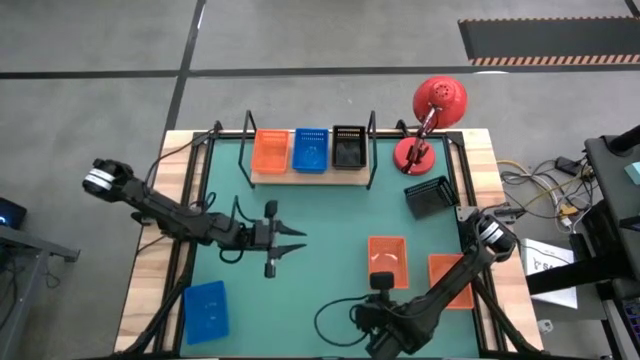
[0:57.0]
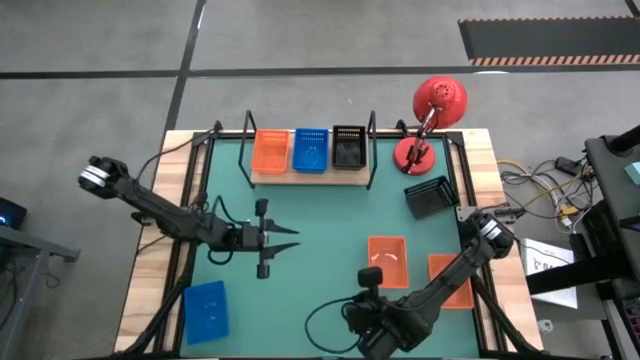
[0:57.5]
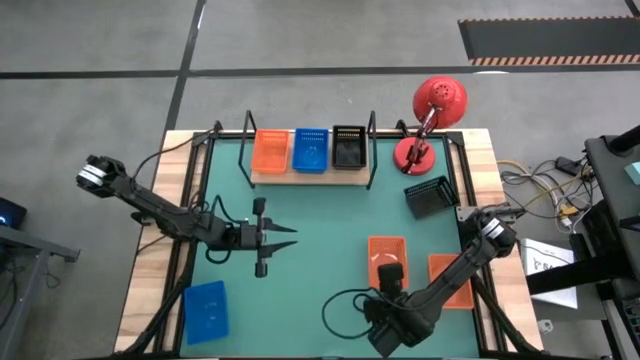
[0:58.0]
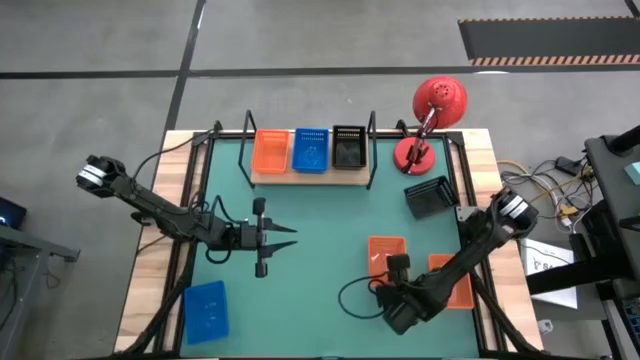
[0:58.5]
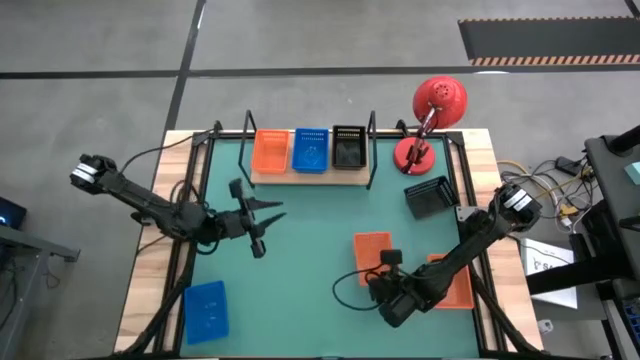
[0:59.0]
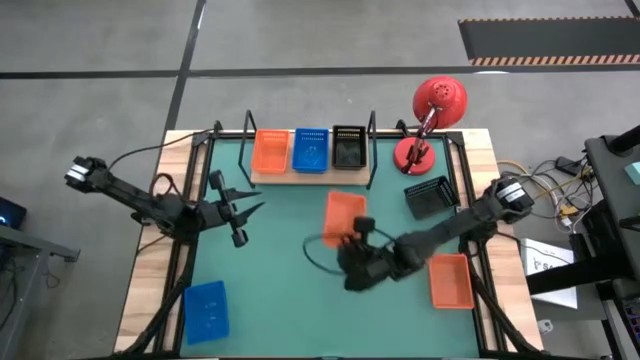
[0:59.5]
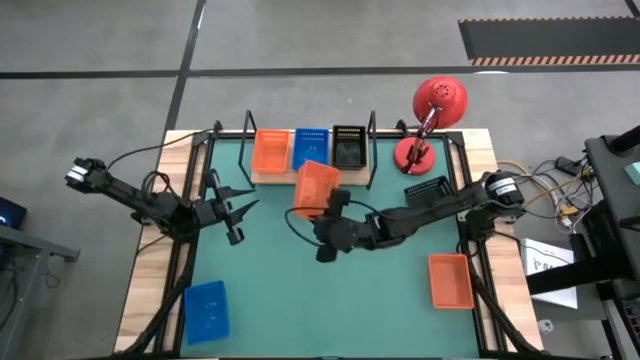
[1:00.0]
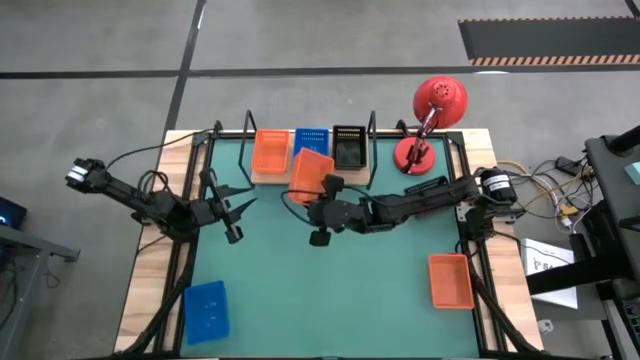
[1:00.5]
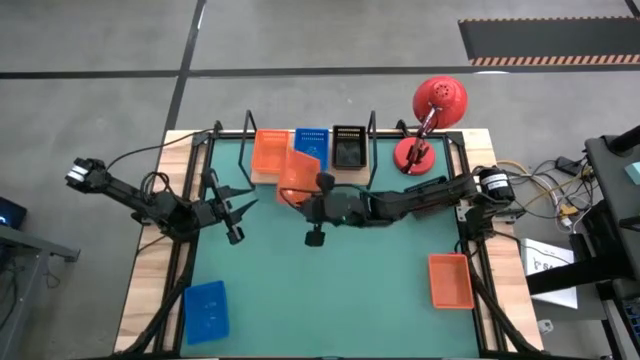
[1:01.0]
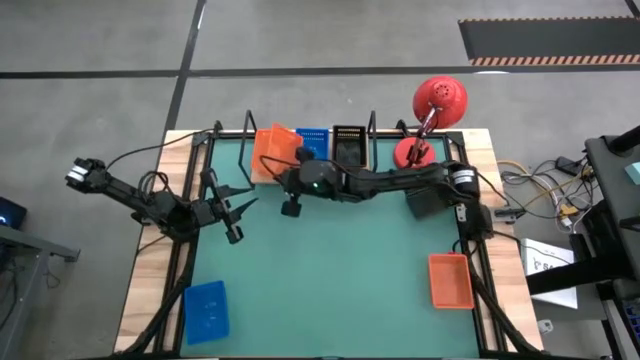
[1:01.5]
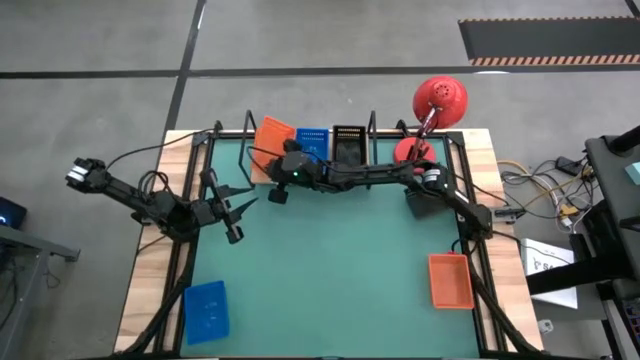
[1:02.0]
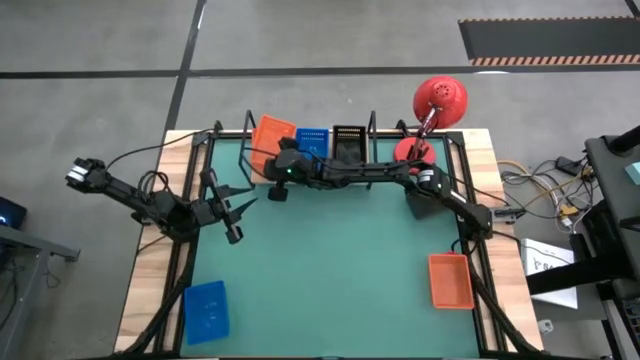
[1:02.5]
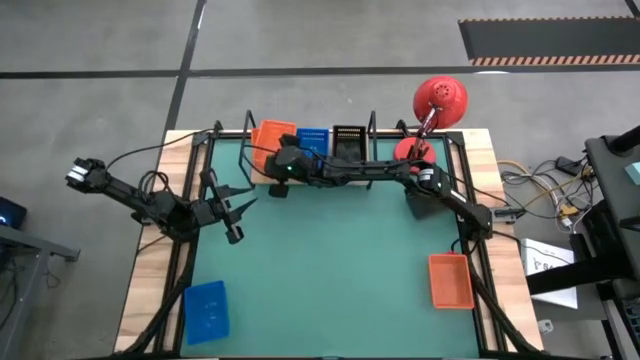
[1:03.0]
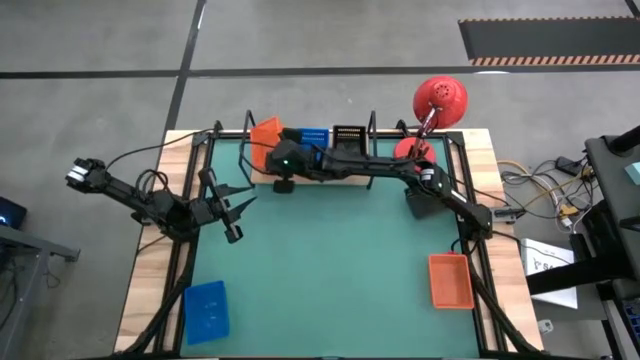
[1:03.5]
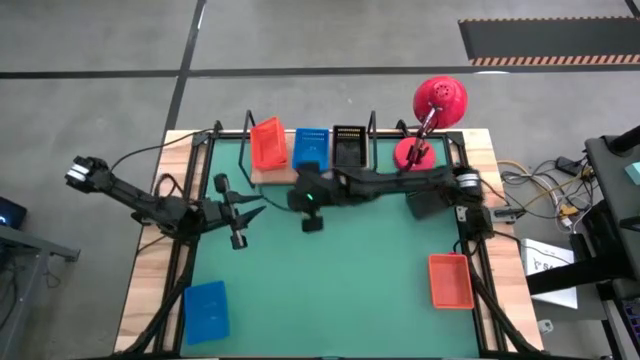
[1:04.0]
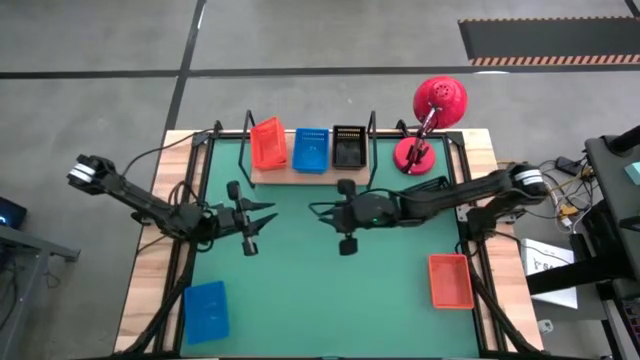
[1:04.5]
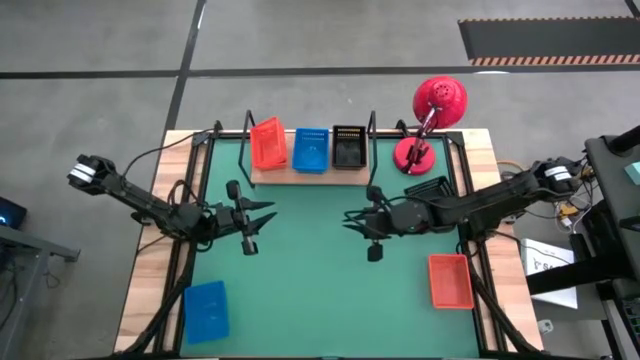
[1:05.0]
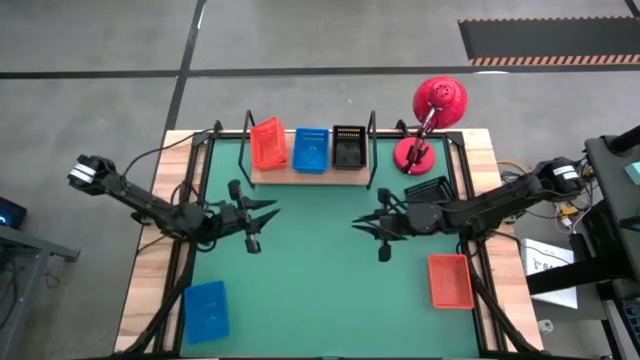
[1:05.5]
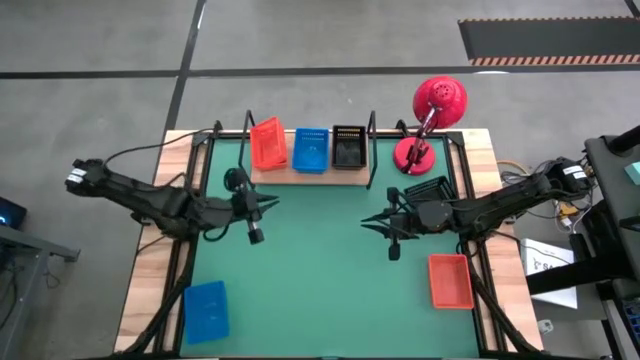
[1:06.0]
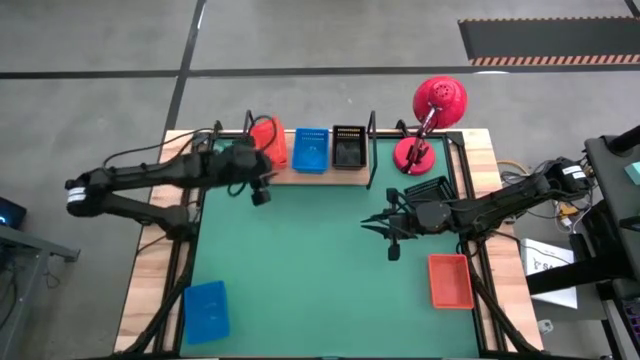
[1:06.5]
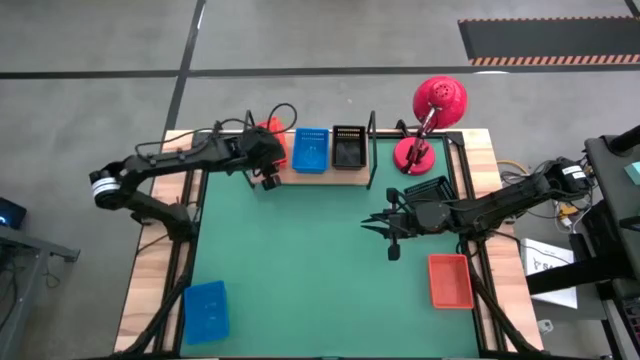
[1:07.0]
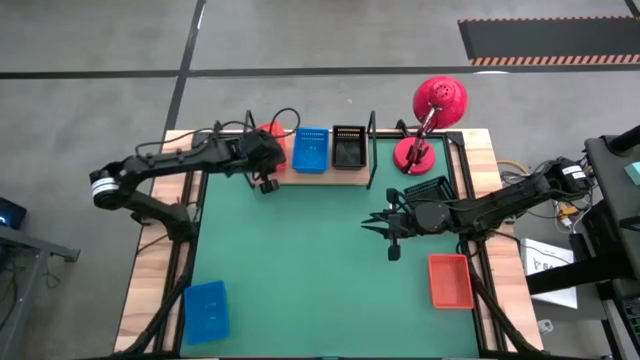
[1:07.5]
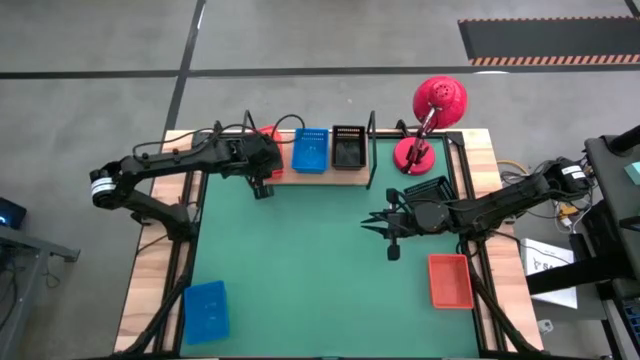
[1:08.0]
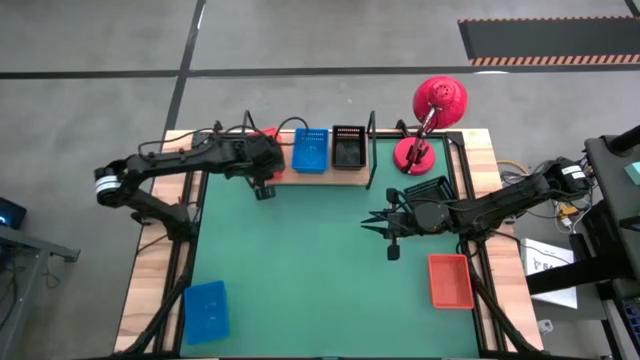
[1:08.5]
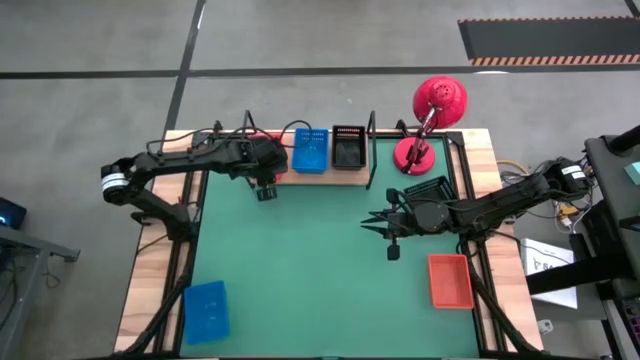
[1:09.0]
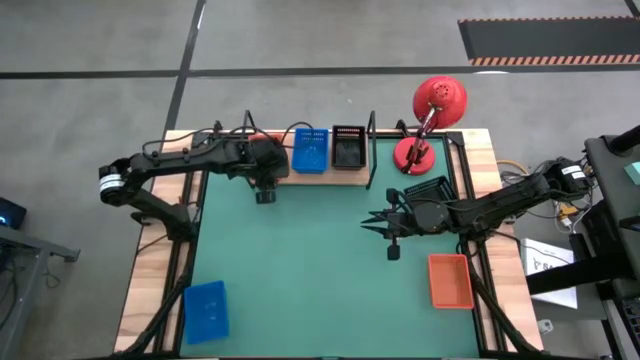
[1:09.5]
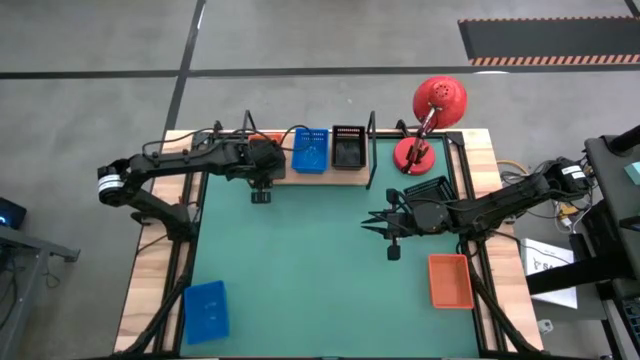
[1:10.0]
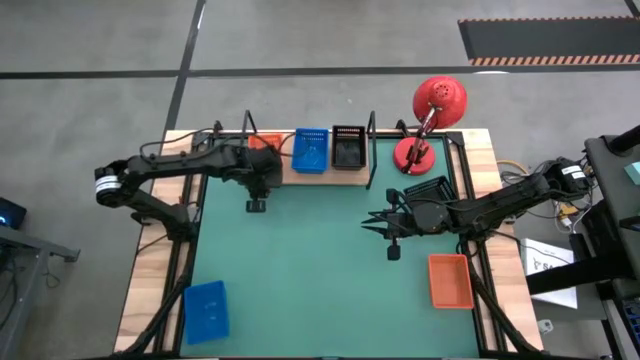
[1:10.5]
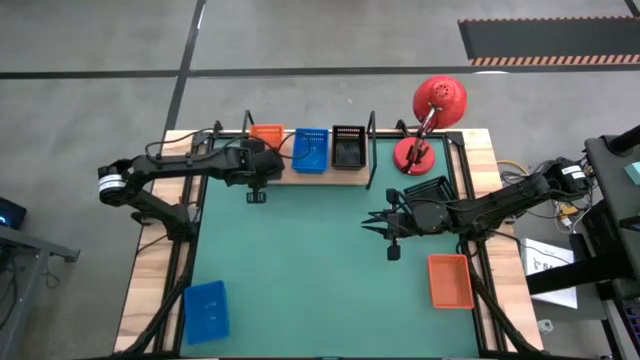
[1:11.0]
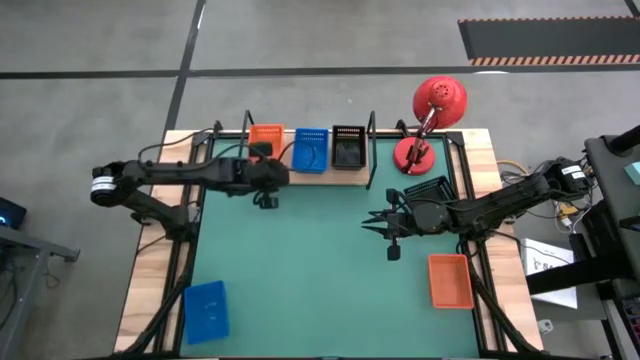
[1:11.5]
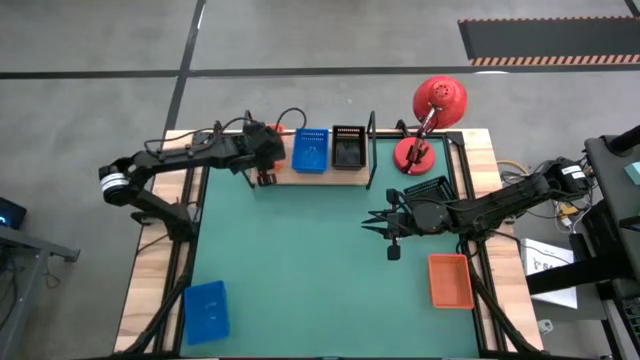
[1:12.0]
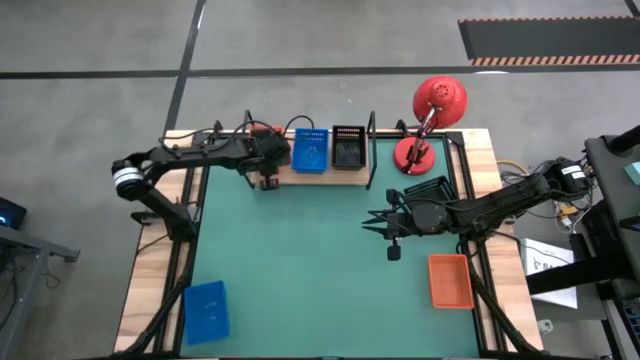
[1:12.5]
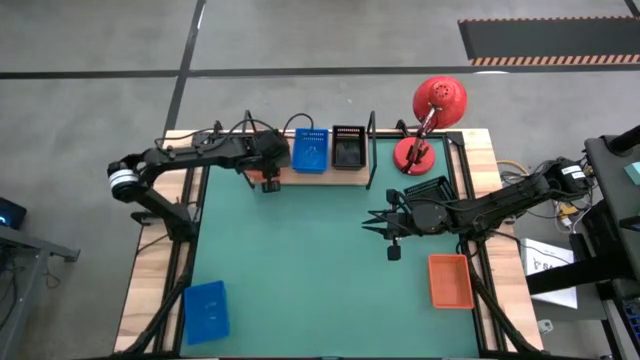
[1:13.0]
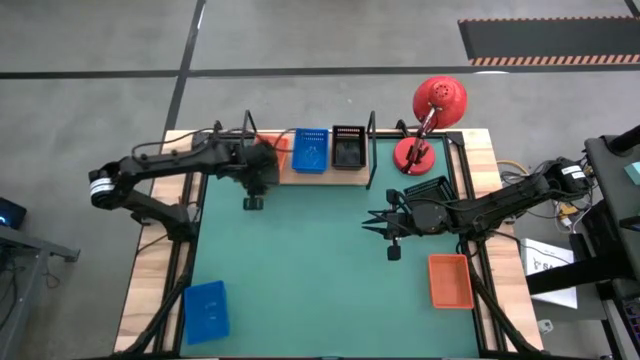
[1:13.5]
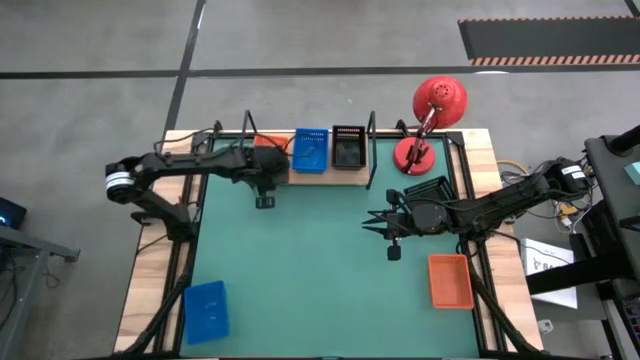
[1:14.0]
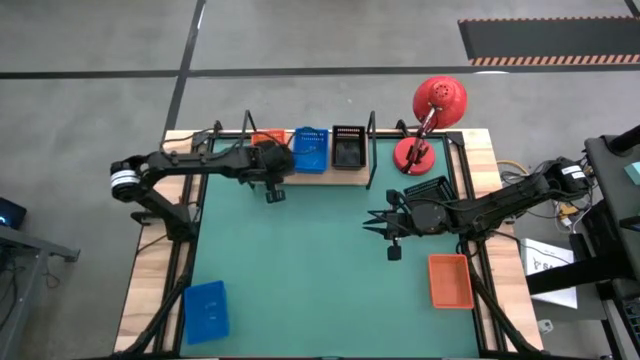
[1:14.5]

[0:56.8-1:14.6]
Task: Stack baskets on shelf by color
Stack the left orange basket on top of the orange basket on the shelf
